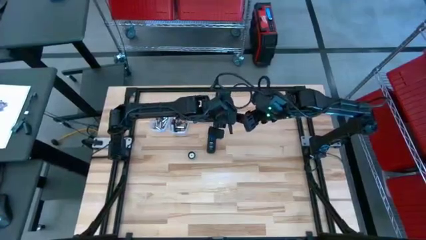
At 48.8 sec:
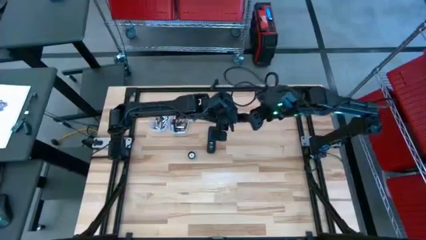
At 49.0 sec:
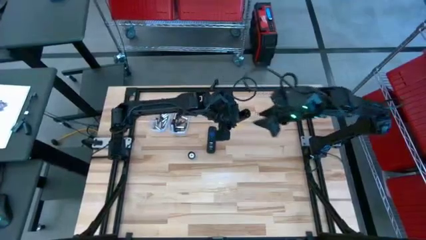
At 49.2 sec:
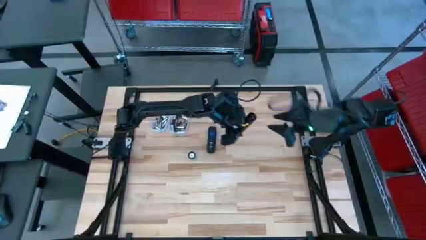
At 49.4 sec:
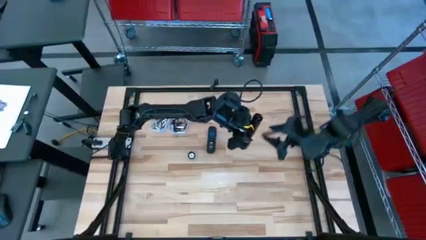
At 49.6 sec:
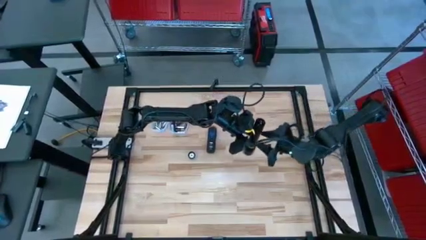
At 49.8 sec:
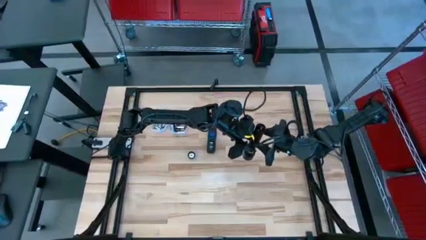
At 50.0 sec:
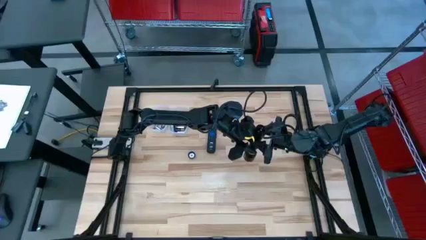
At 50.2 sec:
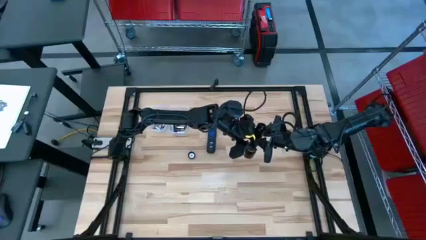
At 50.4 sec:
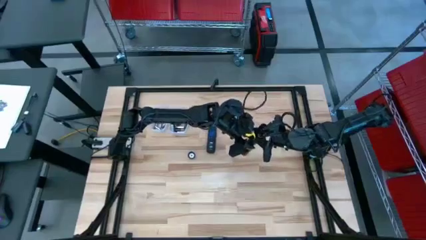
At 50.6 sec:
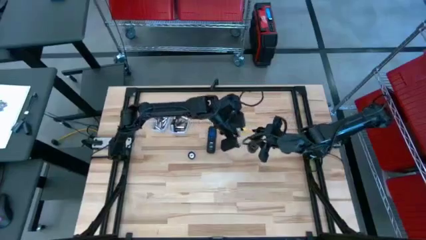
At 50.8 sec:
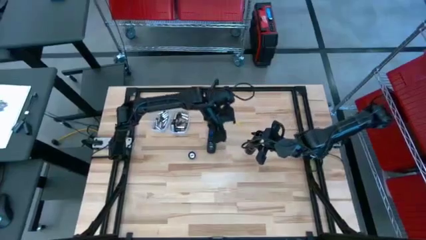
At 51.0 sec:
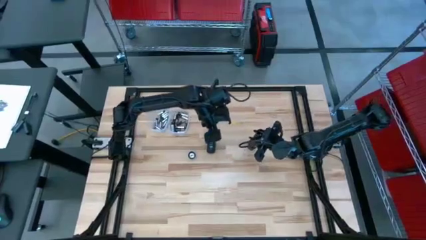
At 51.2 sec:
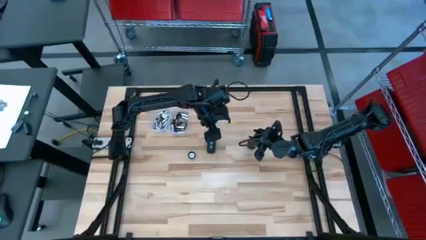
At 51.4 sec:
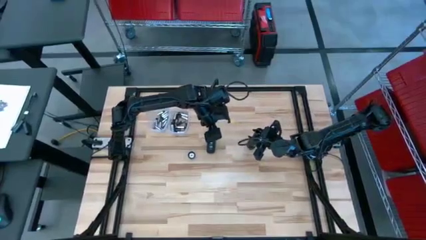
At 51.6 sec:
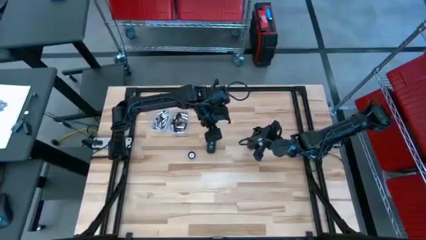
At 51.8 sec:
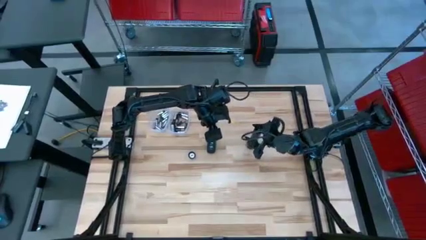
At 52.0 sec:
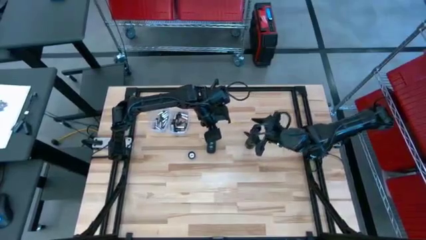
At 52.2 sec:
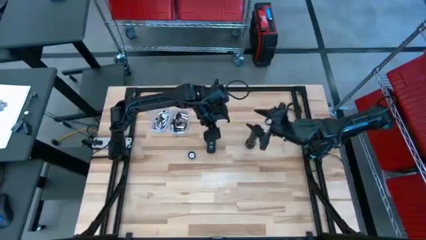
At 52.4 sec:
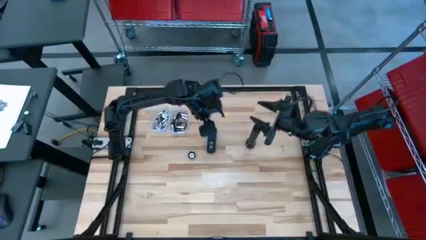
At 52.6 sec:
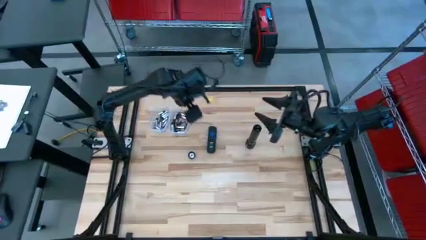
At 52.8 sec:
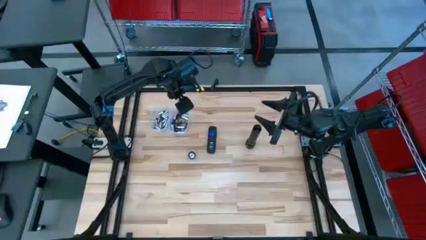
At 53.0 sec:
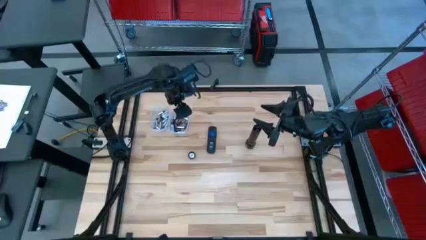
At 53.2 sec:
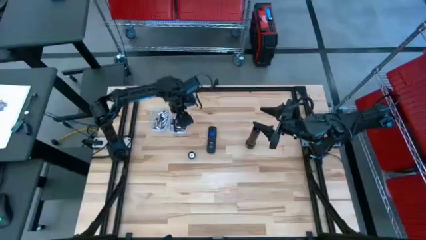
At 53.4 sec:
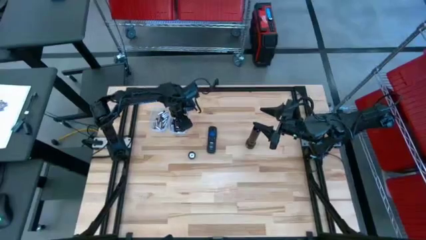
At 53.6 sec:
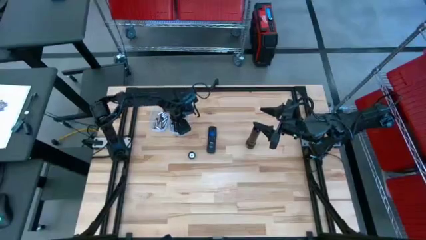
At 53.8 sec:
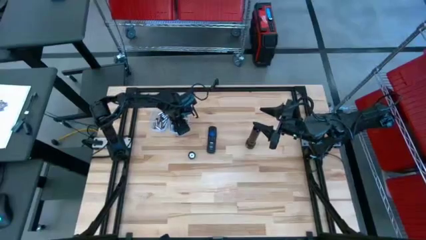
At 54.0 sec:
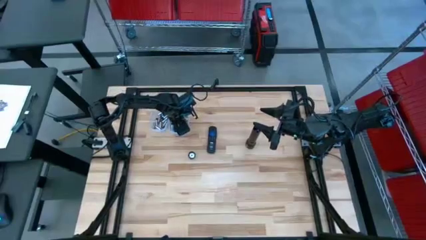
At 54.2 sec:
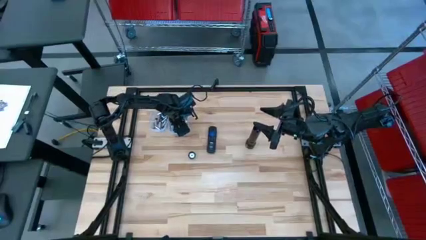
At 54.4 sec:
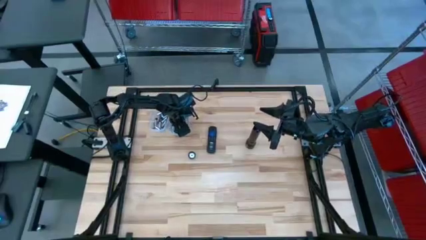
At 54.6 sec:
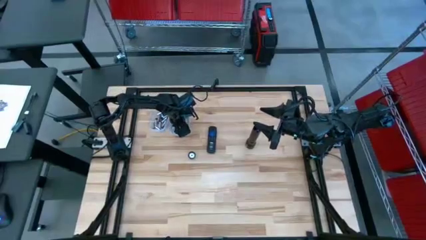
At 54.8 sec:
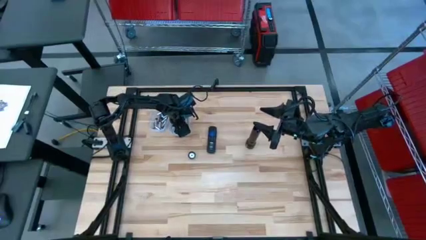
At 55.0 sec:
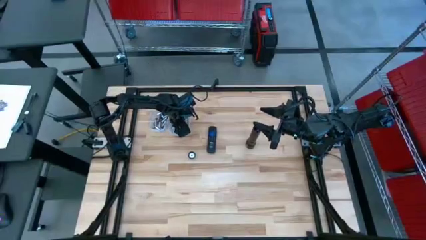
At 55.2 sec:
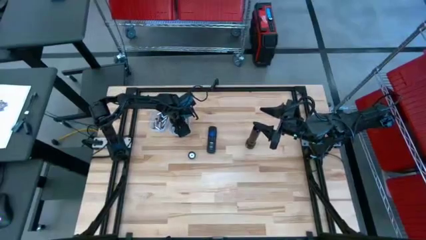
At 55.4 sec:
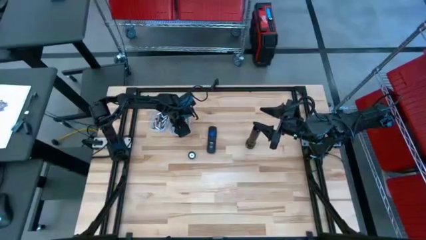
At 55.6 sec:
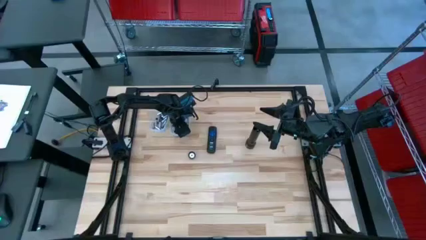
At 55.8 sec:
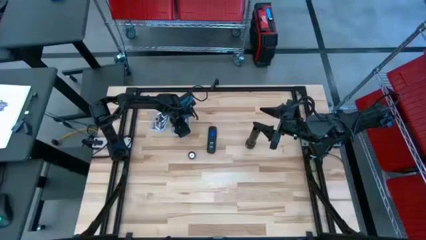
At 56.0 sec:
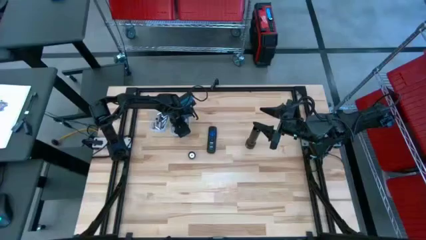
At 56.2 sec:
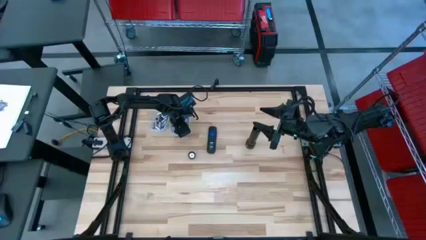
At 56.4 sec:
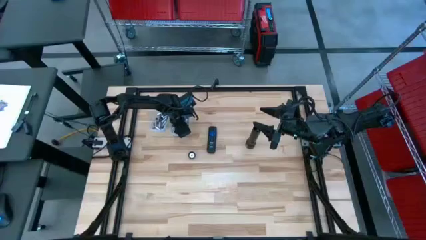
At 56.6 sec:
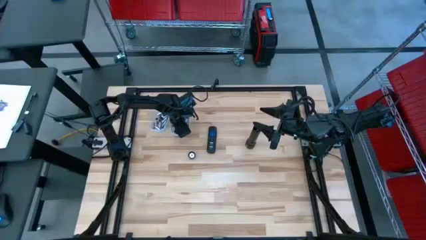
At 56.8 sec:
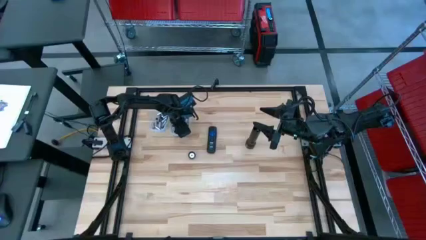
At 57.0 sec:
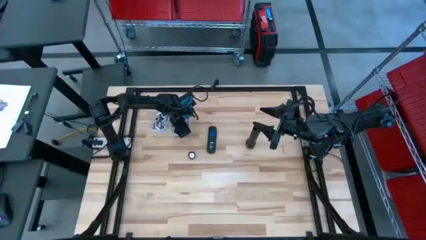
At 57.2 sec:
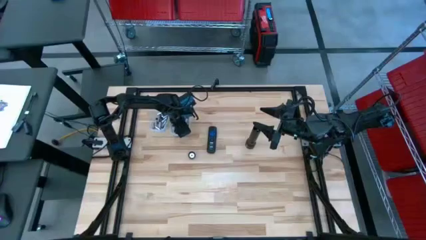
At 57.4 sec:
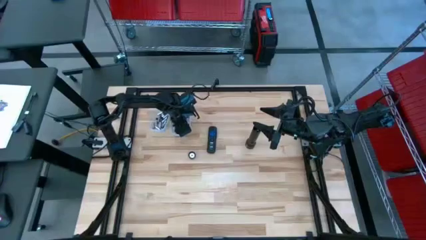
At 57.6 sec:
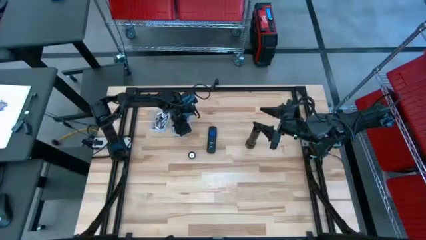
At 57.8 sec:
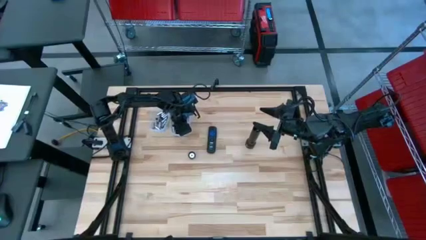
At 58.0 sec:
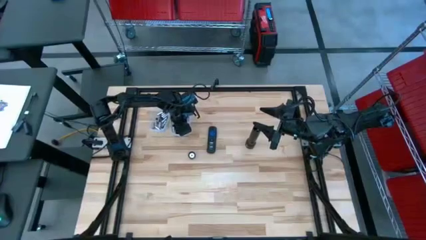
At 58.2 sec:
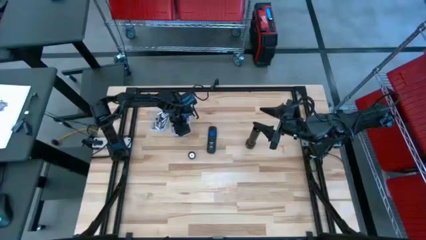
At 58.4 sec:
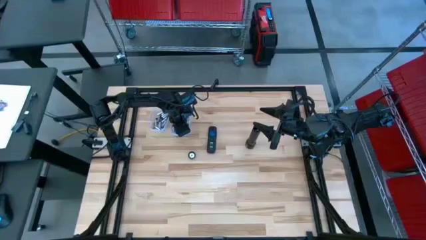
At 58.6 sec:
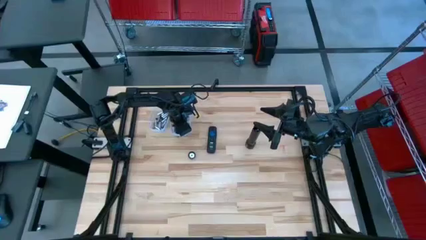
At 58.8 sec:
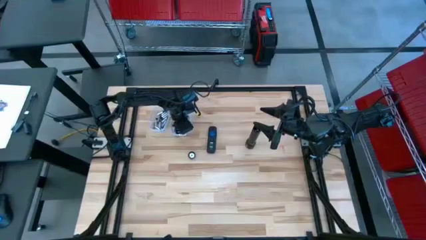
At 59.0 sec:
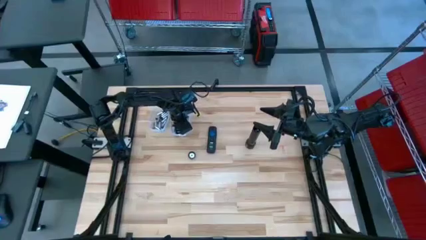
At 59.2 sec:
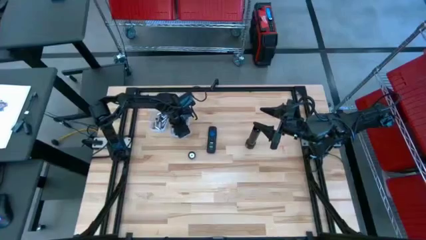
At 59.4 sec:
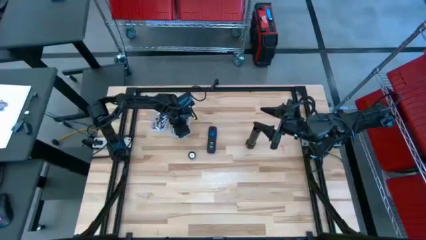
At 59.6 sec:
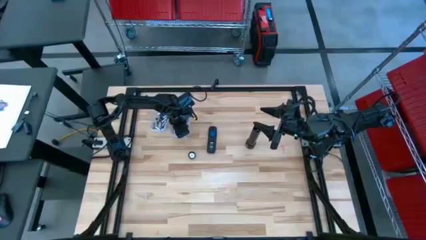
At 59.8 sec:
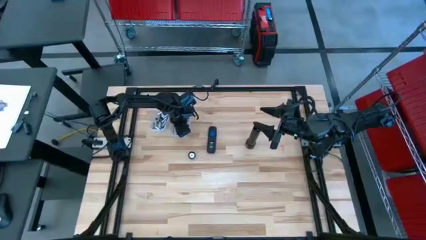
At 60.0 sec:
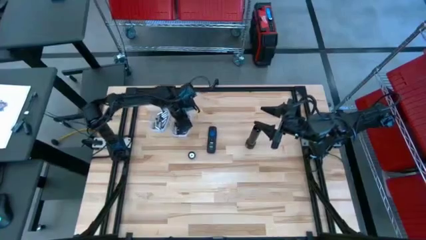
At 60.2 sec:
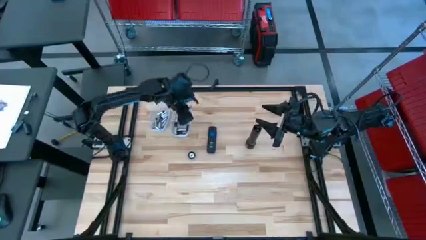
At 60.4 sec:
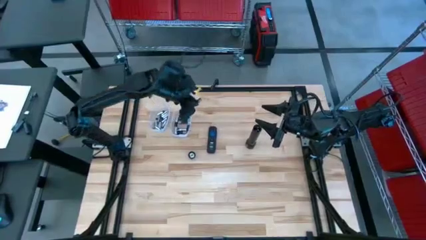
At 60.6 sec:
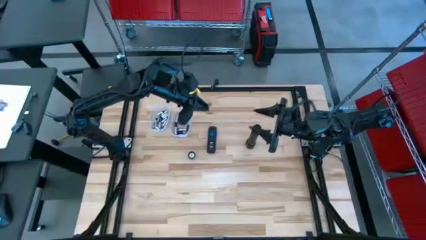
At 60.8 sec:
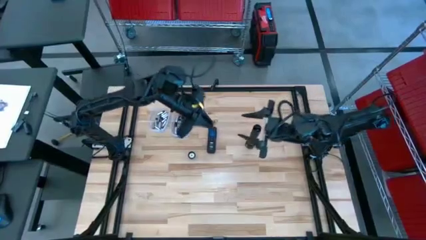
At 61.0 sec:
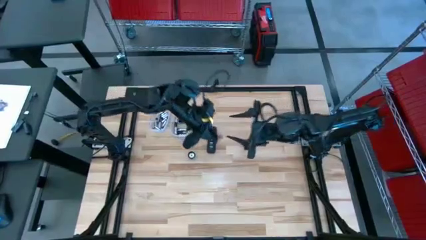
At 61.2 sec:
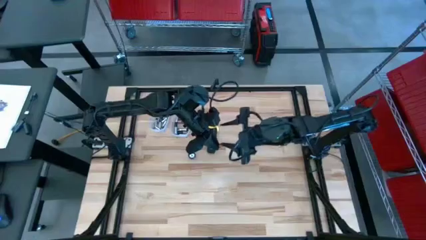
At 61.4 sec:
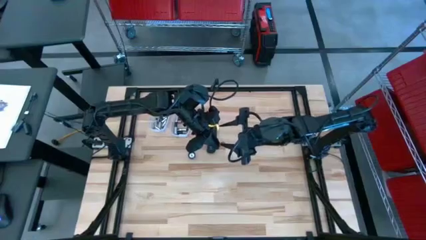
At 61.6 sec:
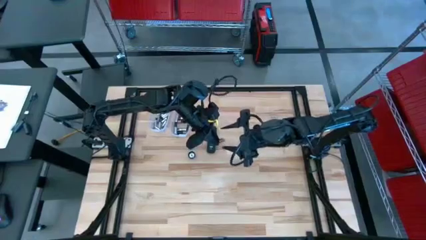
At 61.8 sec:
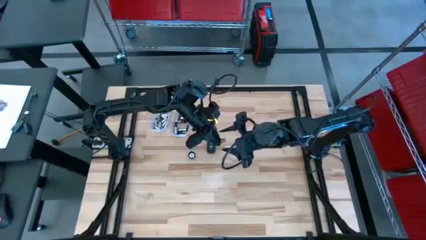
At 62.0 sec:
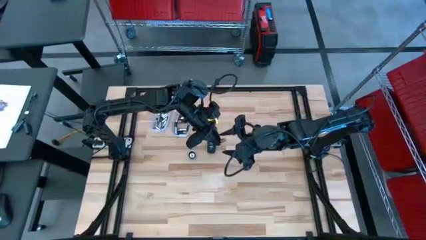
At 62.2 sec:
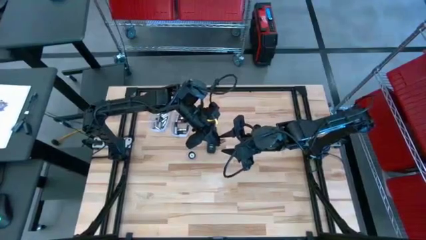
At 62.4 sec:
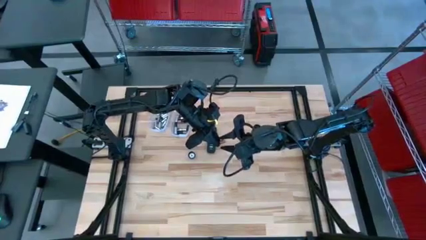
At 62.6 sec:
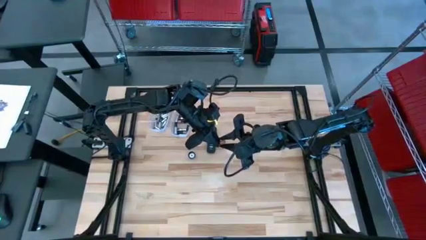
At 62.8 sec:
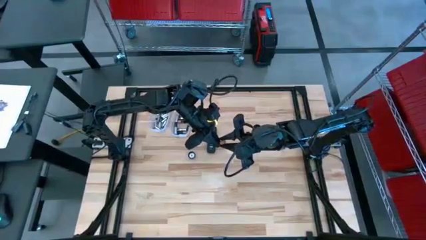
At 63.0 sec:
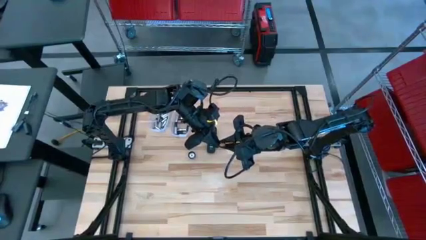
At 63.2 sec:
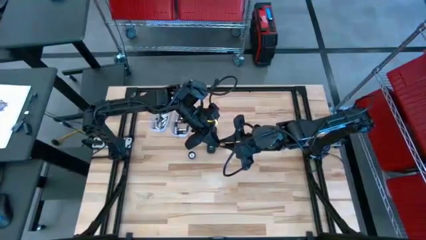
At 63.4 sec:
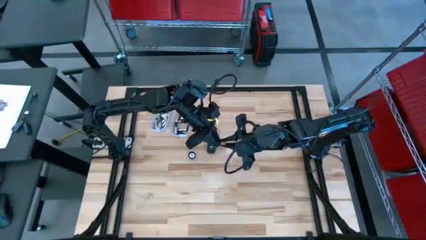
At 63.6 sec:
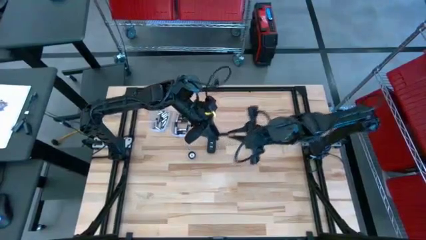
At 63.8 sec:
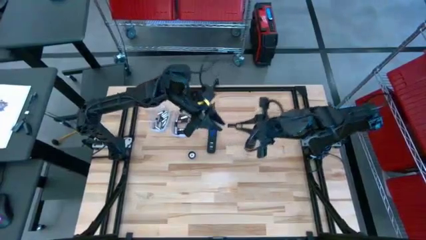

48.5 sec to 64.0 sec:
Task: Insert battery
Insert the brown battery into the flashlight battery compartment
